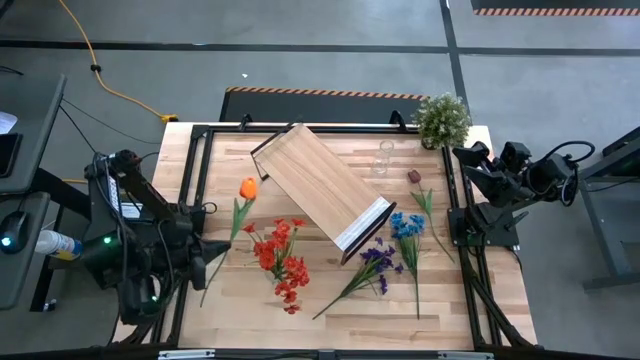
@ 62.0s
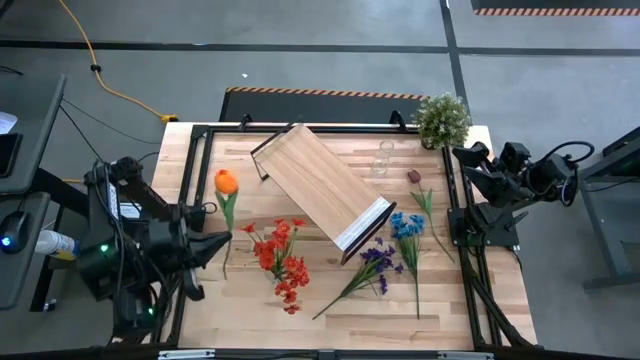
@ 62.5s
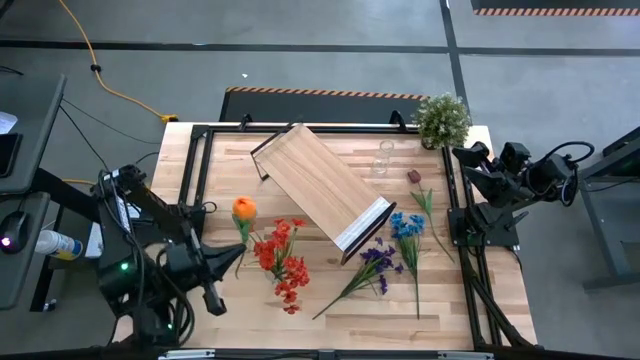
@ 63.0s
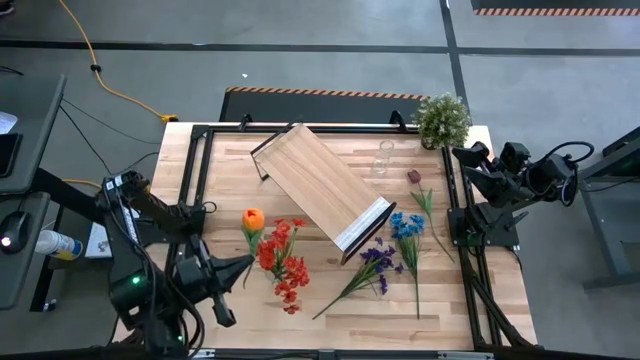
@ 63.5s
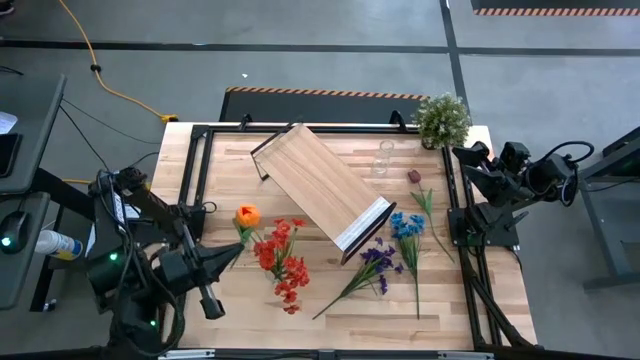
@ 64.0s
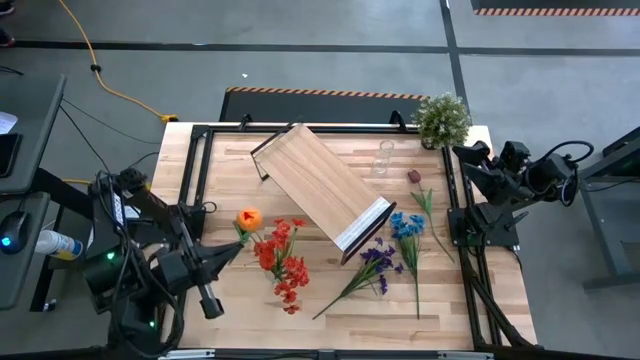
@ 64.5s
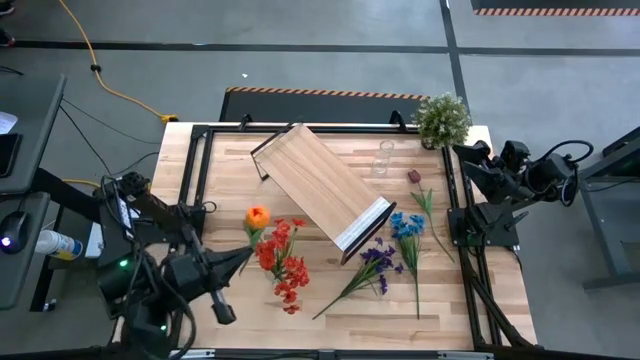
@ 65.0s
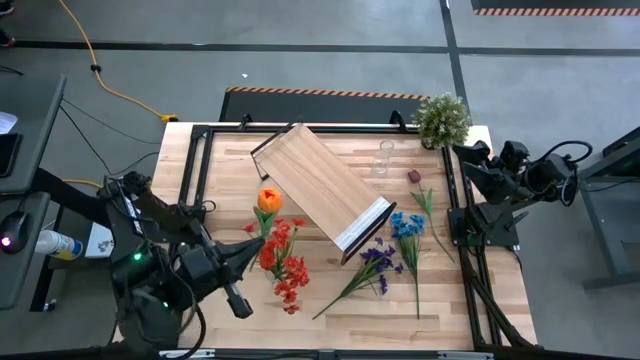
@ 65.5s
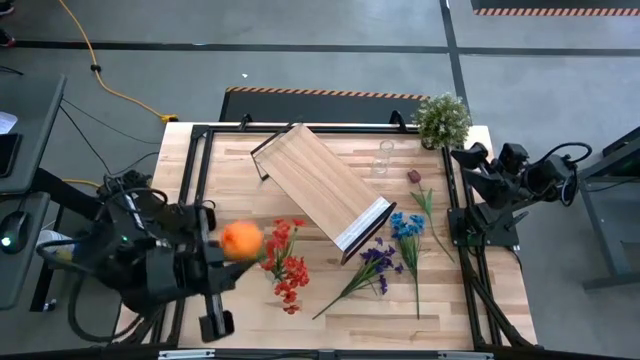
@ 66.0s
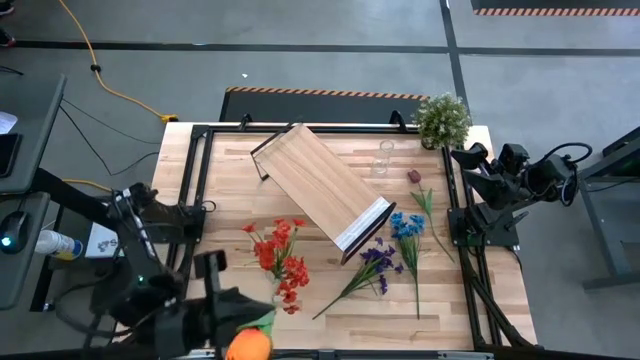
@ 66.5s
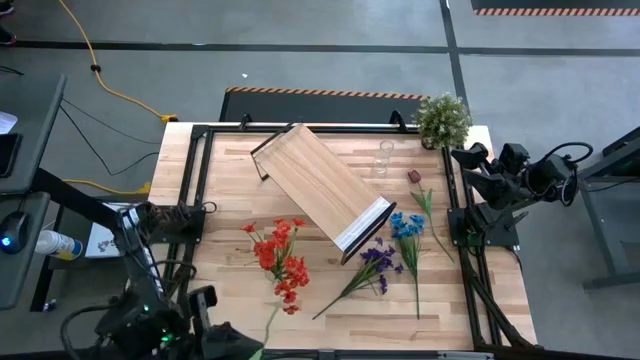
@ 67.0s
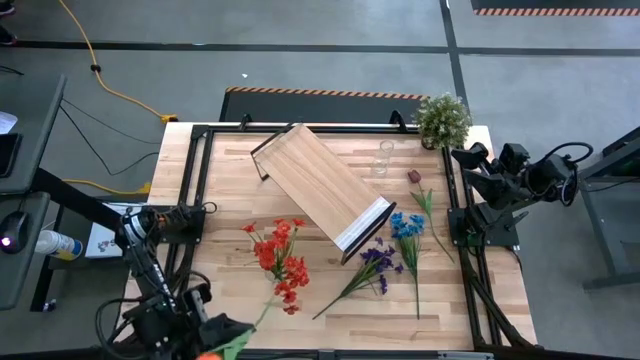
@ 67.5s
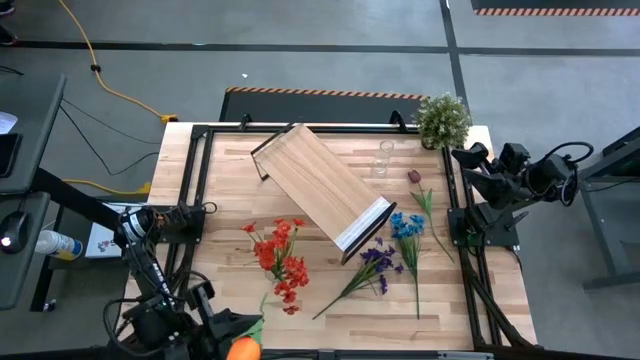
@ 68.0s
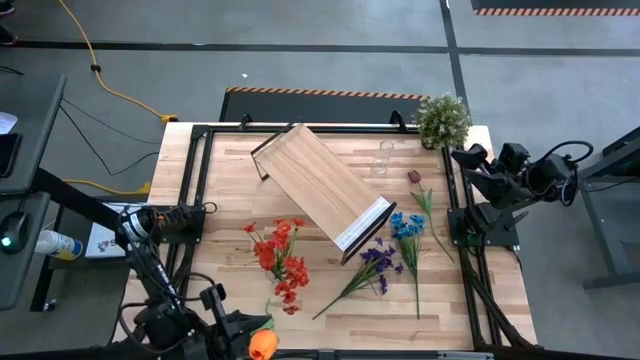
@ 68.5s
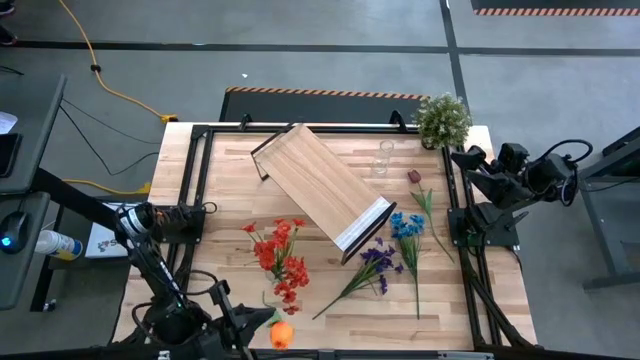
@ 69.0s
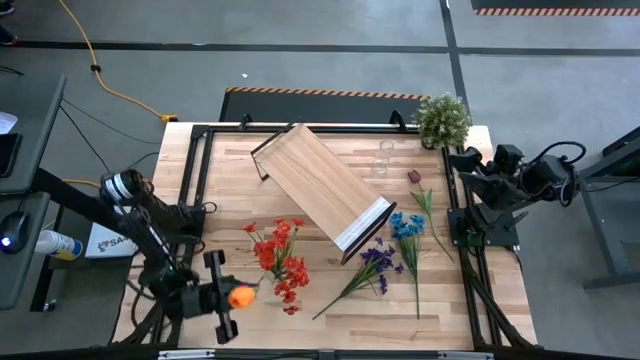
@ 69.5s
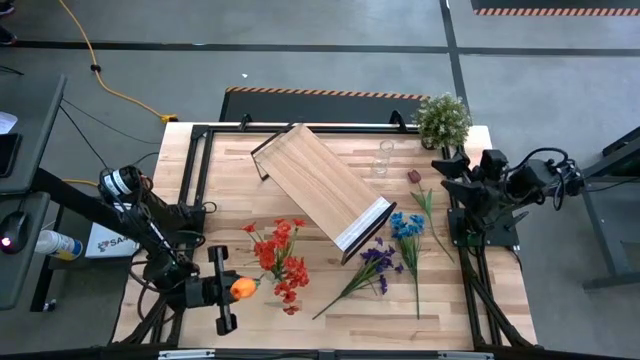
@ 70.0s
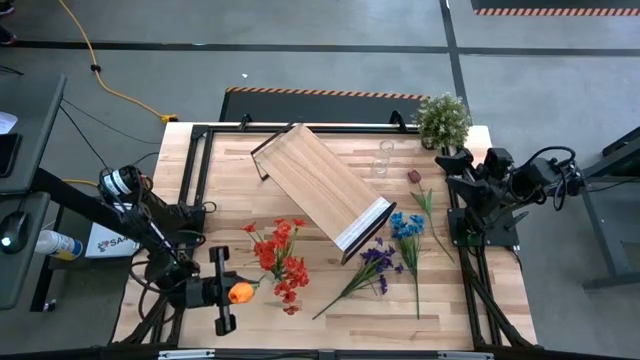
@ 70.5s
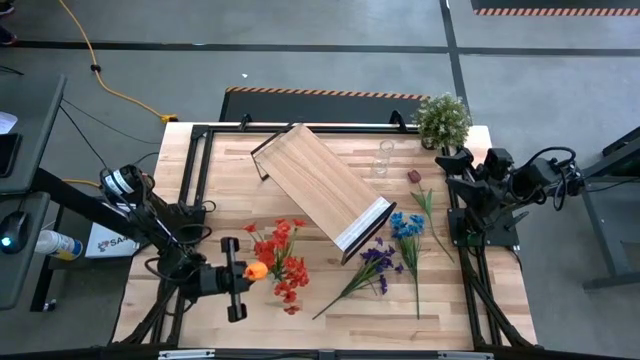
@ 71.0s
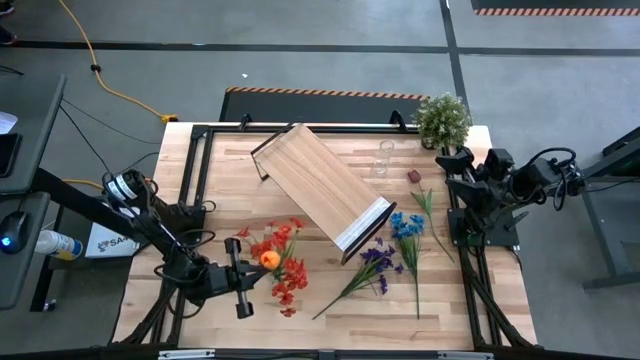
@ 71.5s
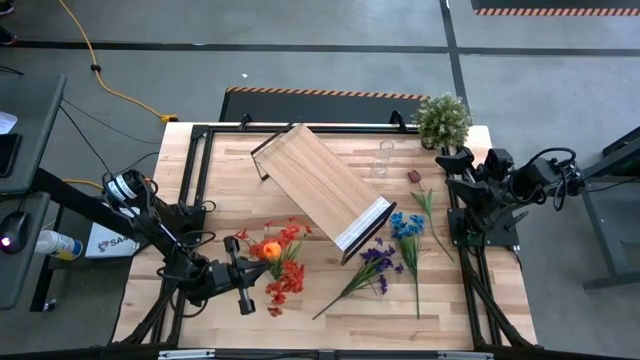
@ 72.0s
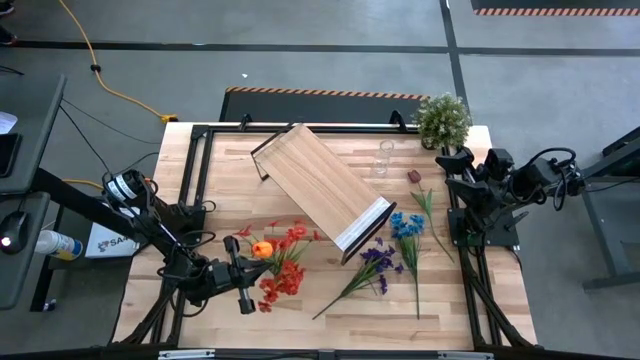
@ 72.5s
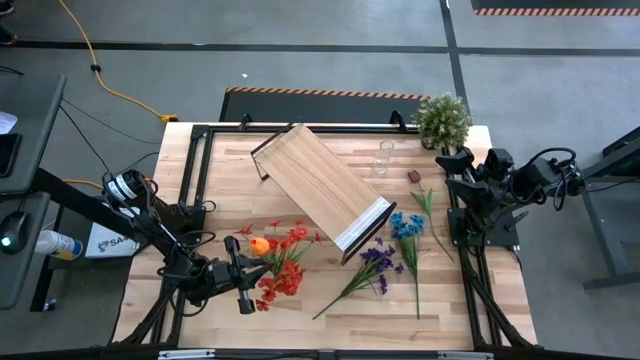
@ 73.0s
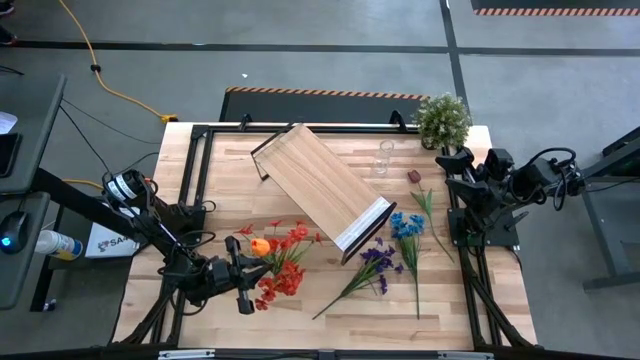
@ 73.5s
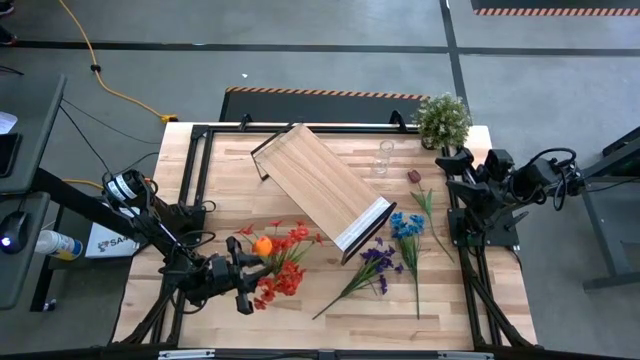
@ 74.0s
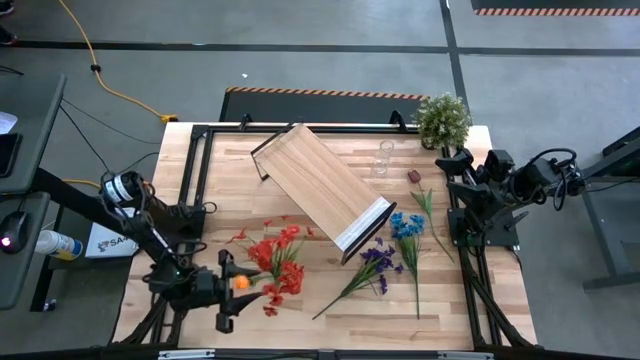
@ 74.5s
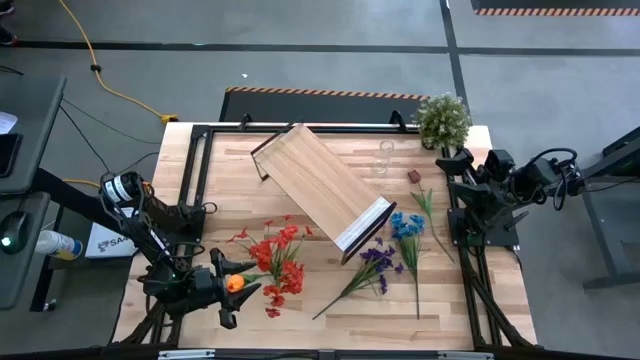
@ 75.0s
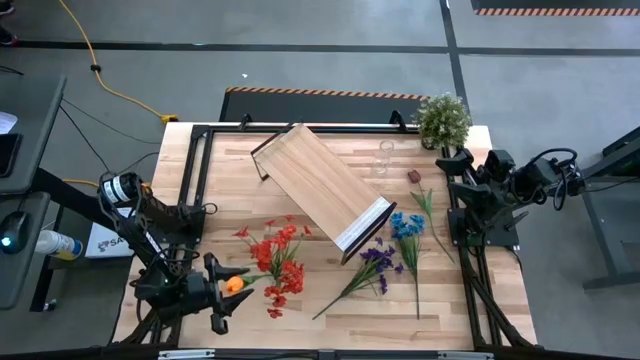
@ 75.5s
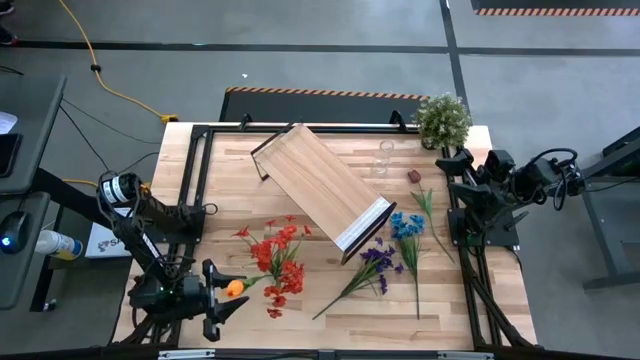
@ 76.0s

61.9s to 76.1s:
Task: Pick and place flowers into a vace then onto a shelf
Put the orange tulip into the bottom transparent vase

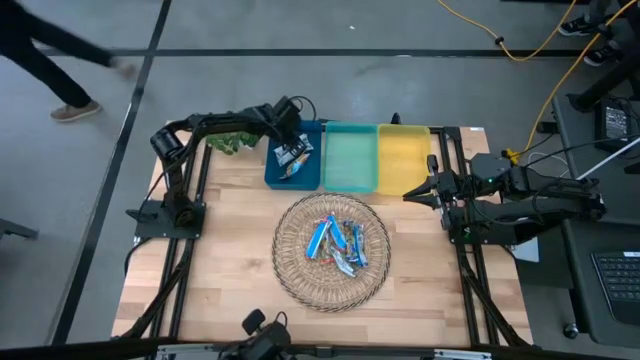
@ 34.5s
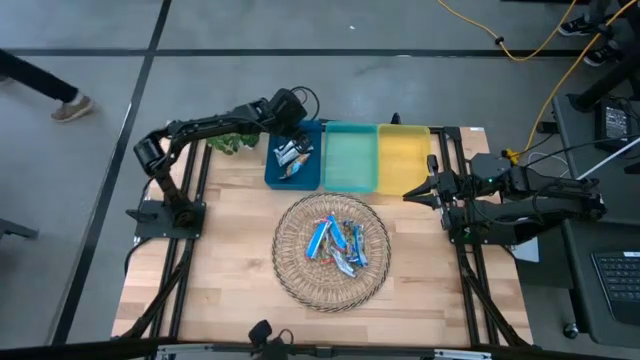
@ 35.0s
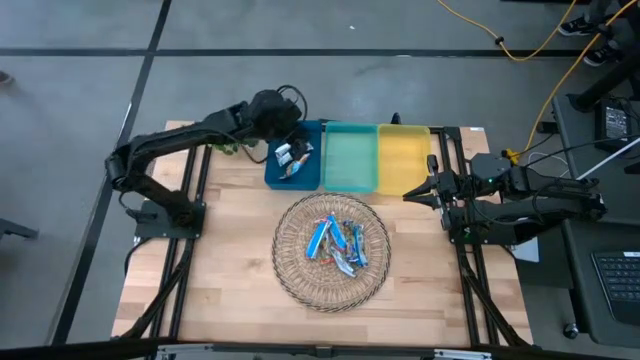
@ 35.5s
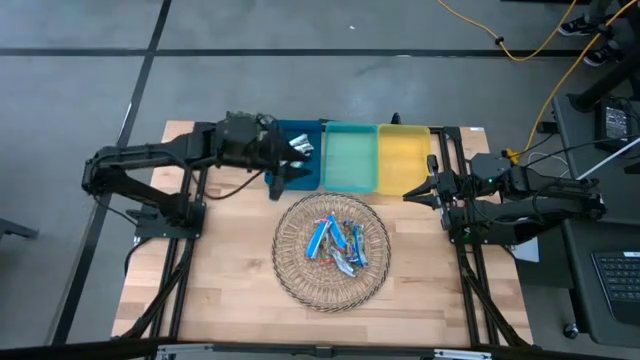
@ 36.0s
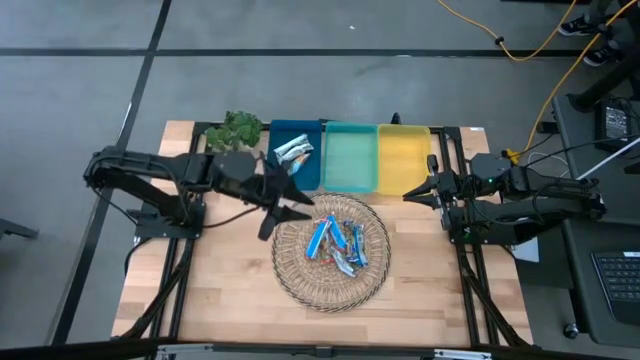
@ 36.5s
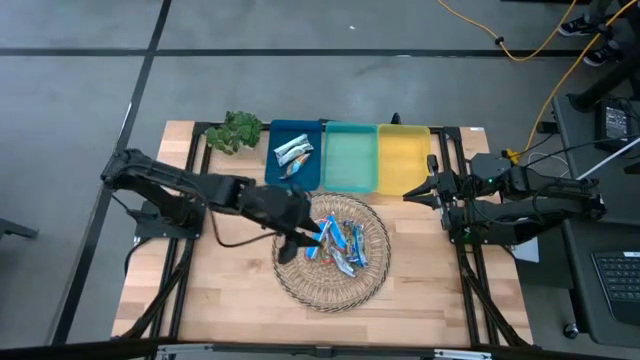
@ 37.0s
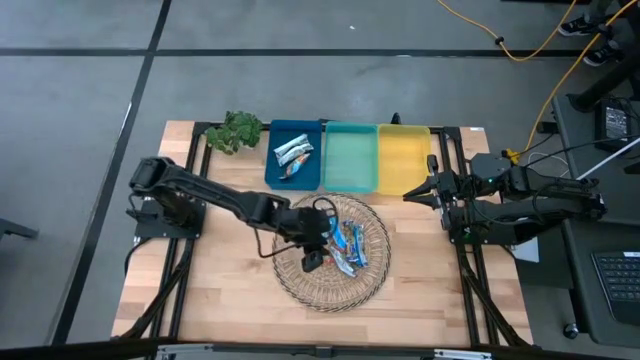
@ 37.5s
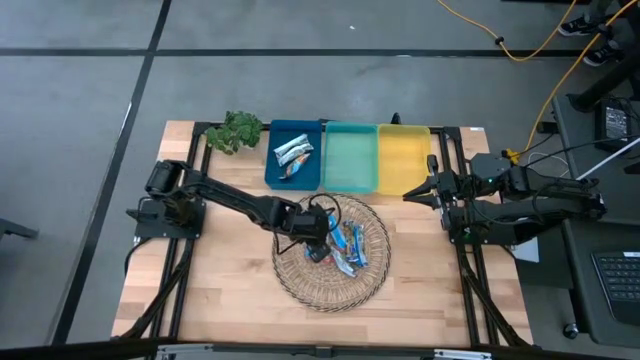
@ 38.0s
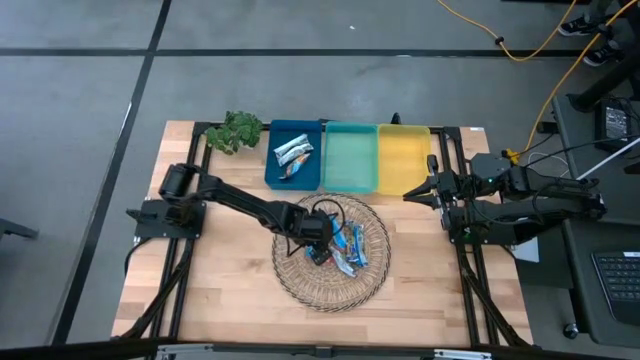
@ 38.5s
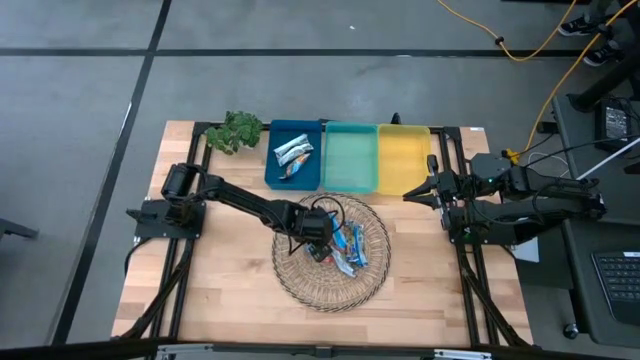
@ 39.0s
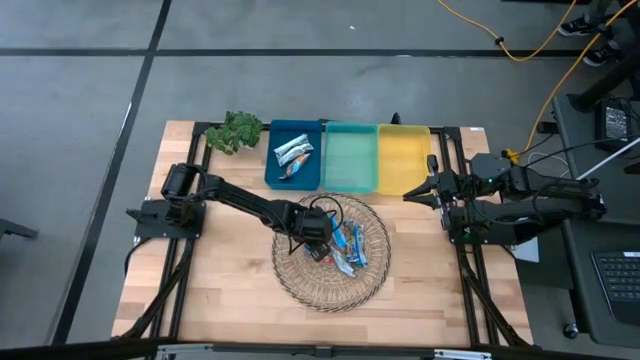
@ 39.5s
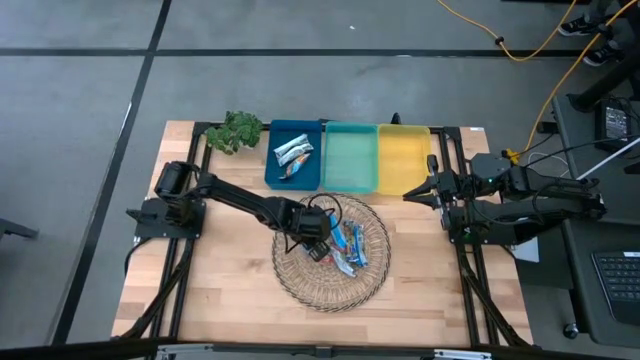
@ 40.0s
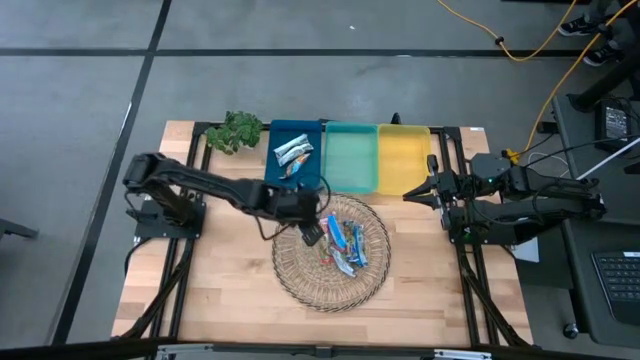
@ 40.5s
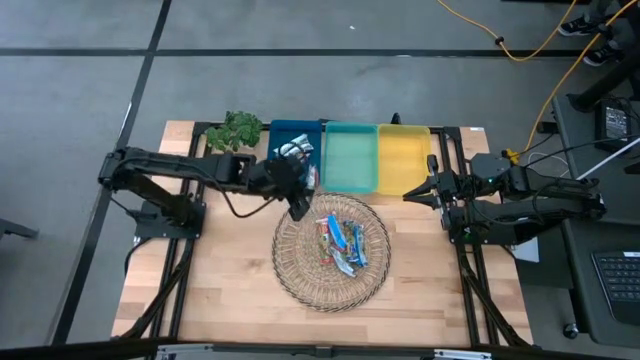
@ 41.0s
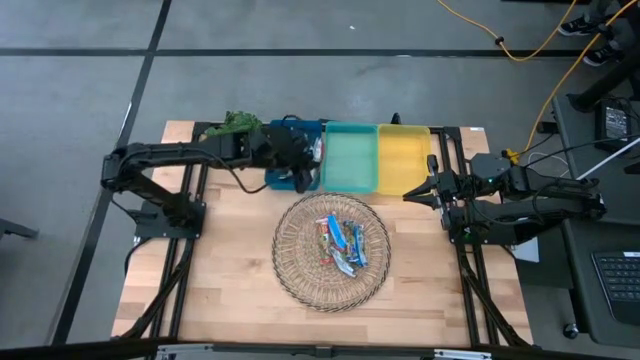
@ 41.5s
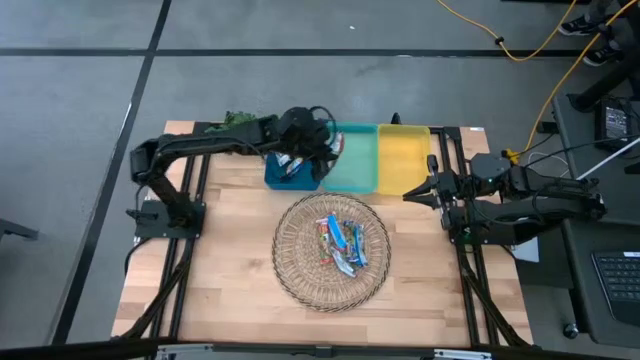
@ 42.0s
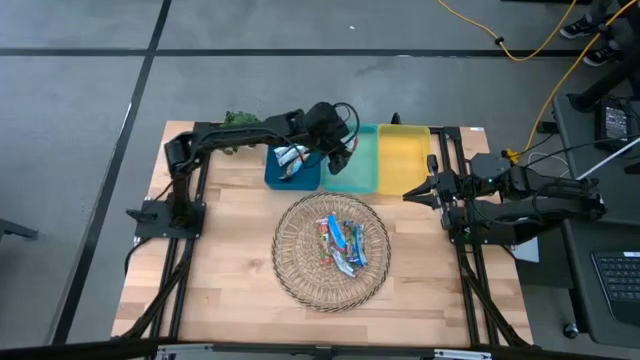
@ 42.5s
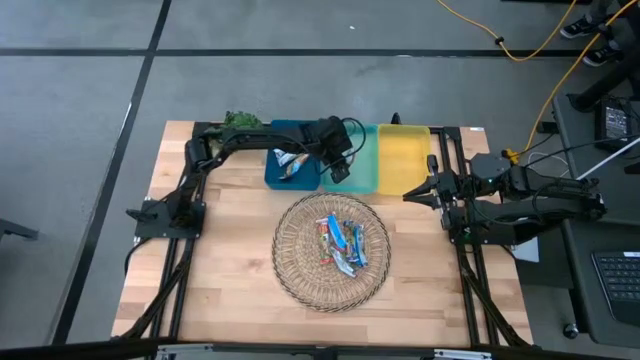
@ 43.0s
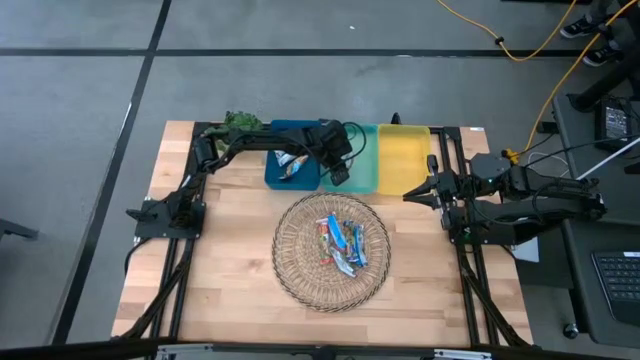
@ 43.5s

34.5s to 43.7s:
Task: Pick and place Granola Bars by type
Put the orange granola bar into the green bin
